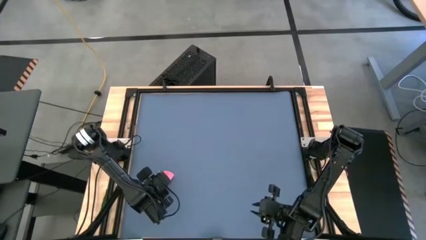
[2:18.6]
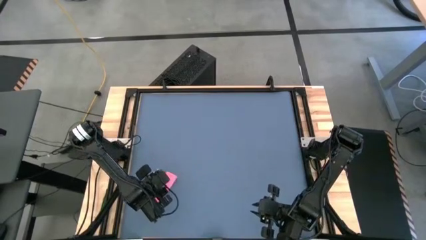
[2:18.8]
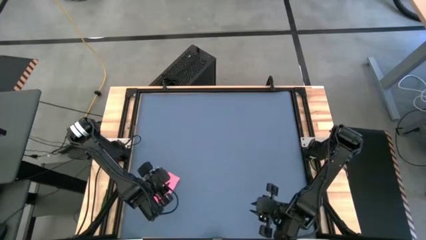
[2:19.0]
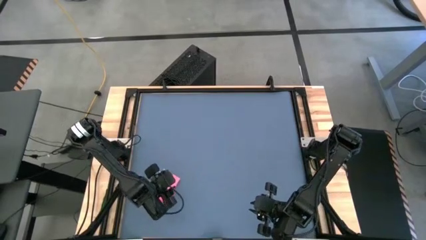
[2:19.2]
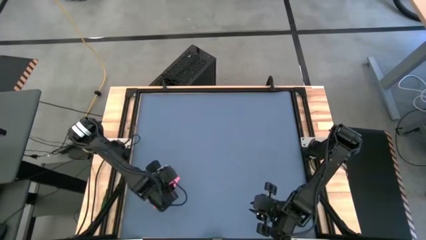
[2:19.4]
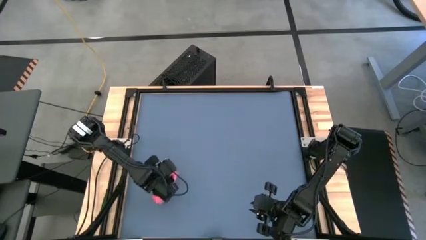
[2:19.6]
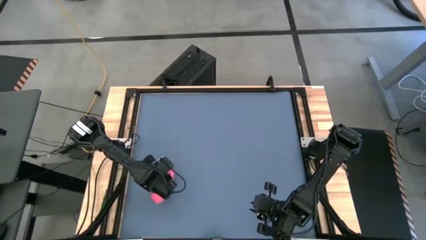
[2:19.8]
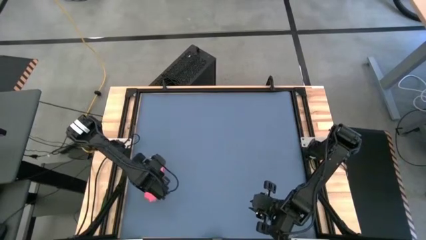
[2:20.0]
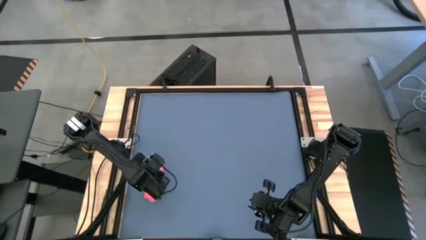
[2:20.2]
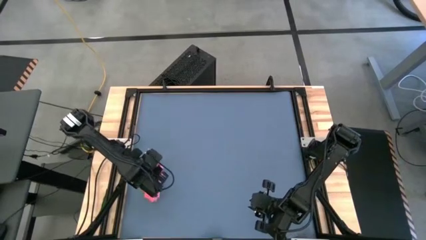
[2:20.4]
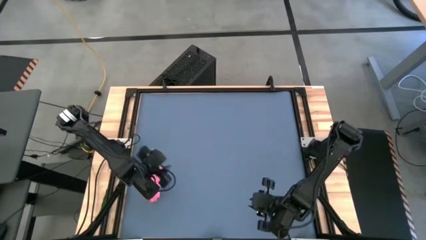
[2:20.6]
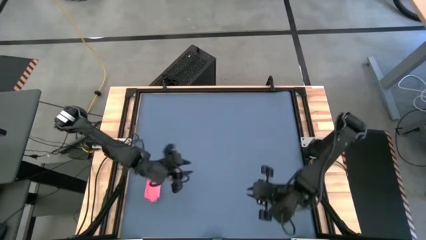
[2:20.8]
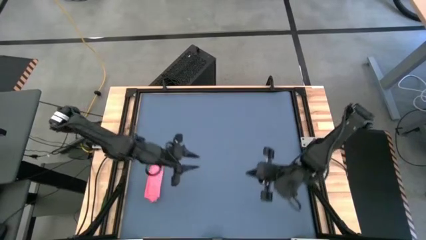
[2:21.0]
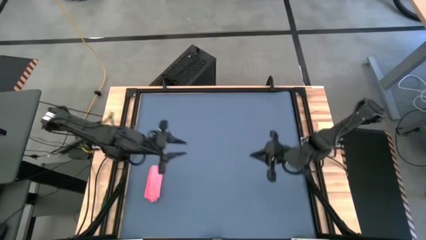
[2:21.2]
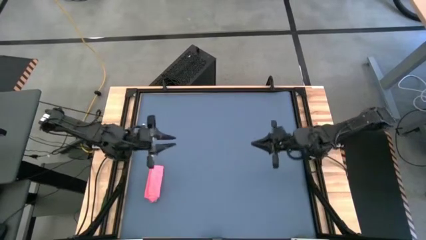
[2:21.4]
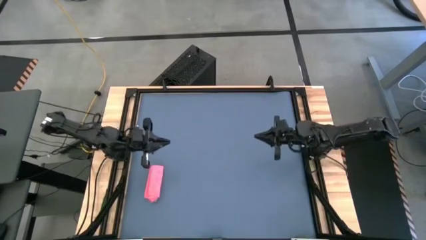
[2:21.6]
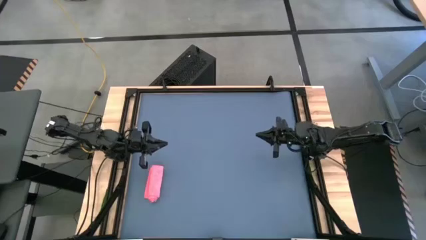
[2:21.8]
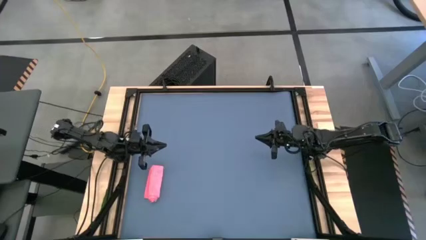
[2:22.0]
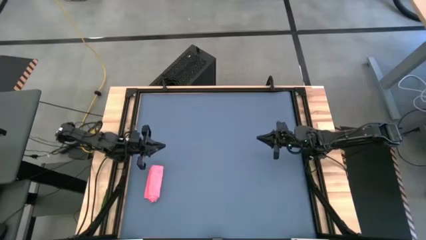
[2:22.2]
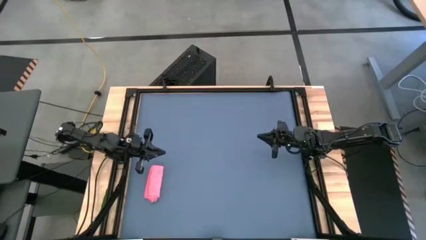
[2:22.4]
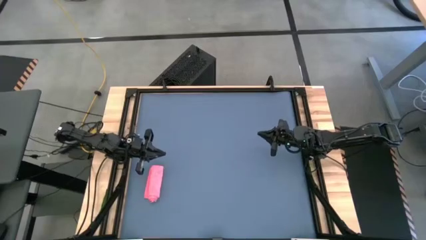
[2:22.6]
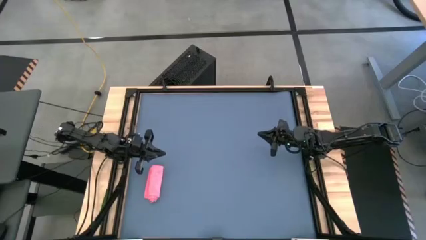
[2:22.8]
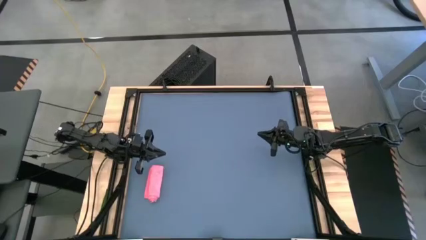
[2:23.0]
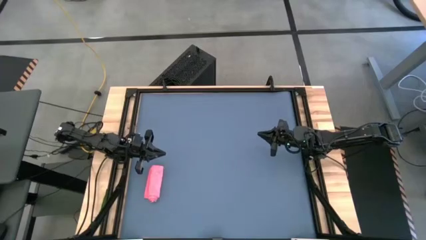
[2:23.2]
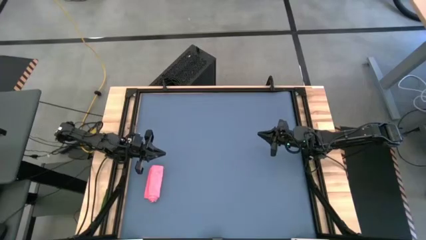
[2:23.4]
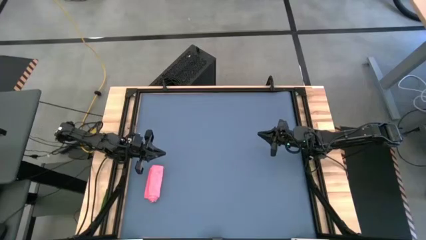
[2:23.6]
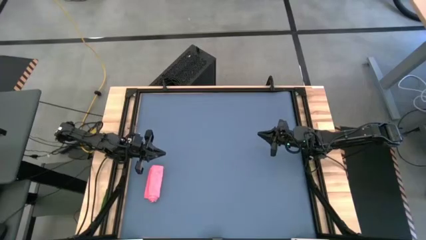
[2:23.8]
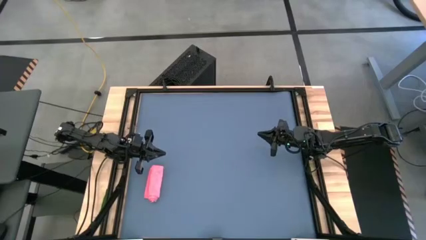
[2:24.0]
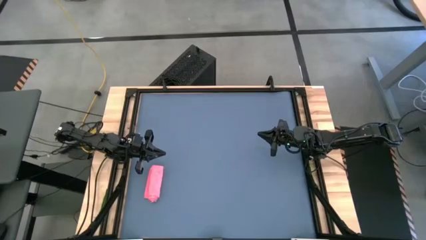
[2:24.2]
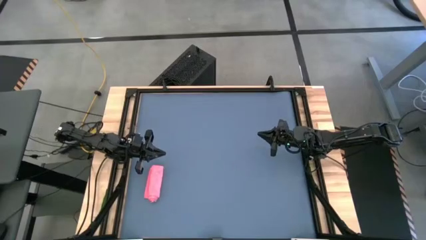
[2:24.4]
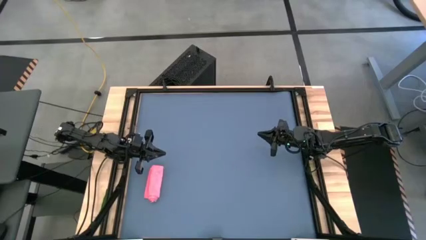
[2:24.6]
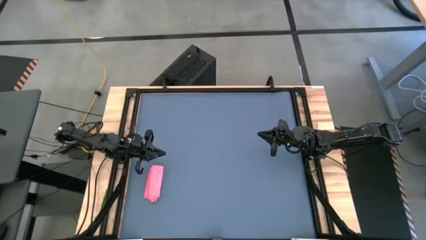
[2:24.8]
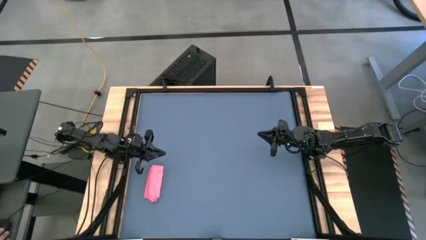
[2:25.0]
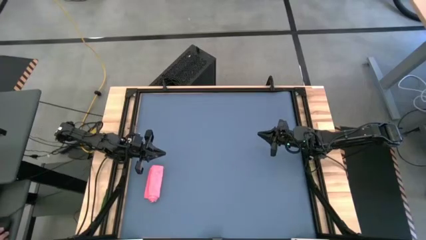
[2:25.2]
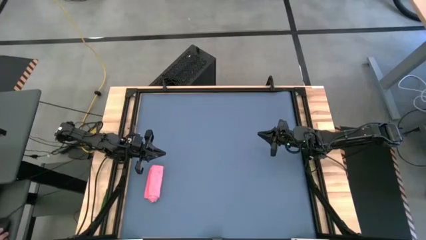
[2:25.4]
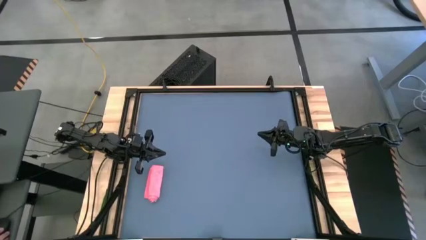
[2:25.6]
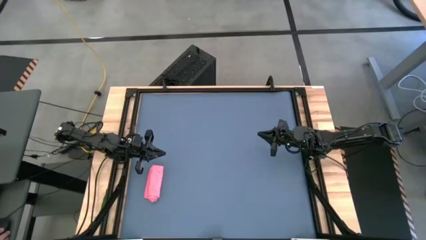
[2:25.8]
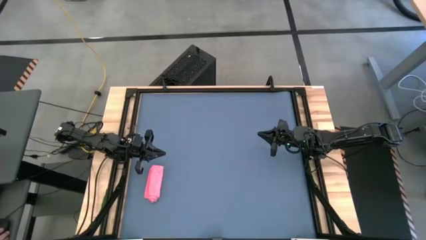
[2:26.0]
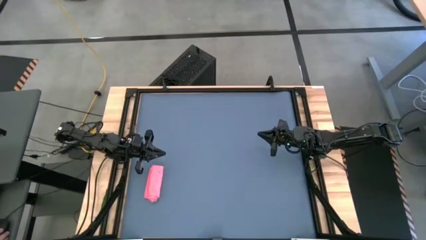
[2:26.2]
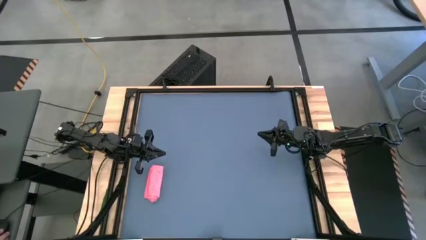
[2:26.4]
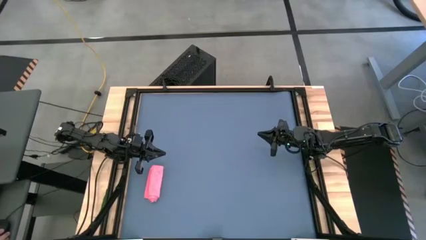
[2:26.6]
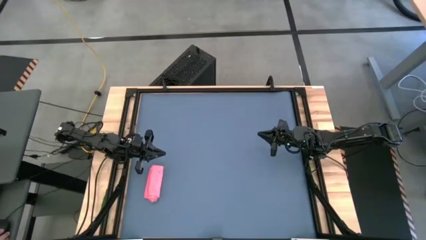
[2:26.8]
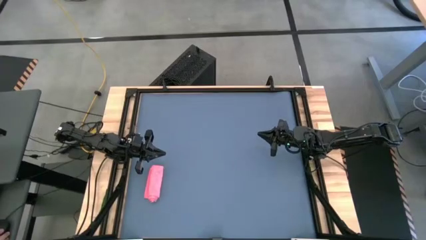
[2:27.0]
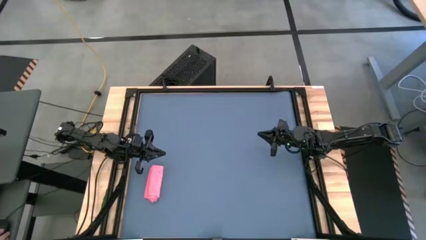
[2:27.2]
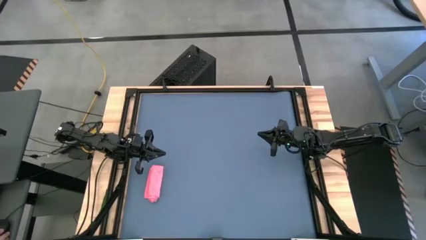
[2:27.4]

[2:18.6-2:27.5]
Task: Roll towel
Return to Home Position

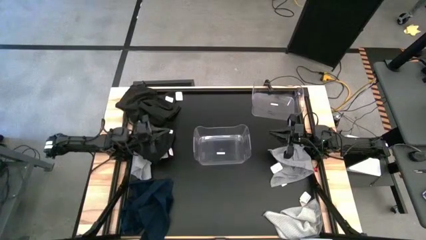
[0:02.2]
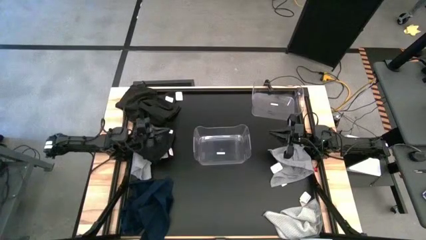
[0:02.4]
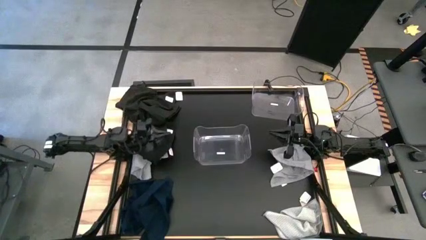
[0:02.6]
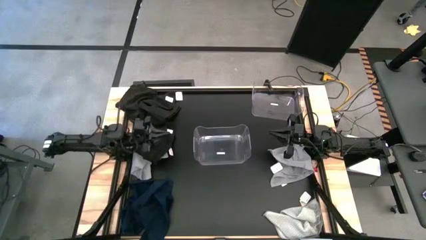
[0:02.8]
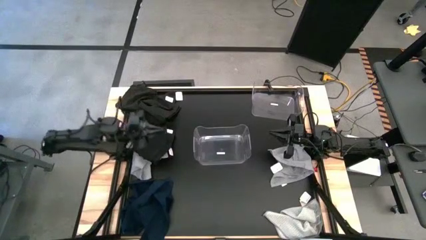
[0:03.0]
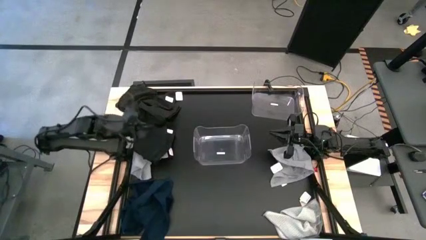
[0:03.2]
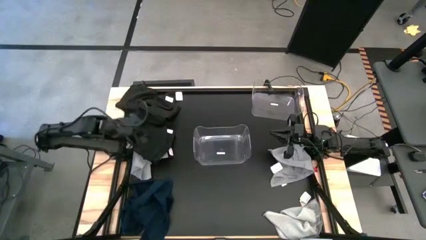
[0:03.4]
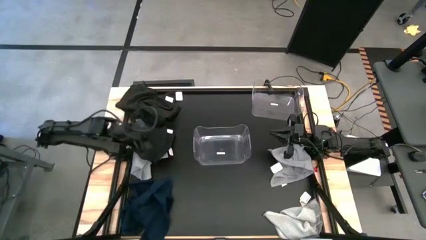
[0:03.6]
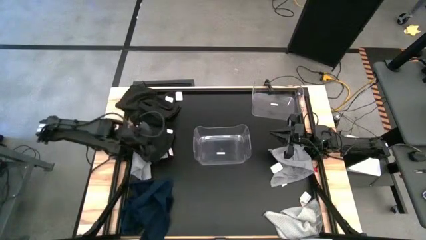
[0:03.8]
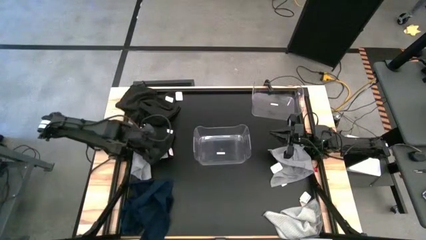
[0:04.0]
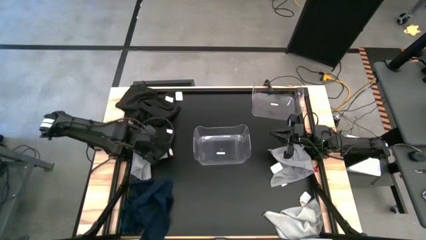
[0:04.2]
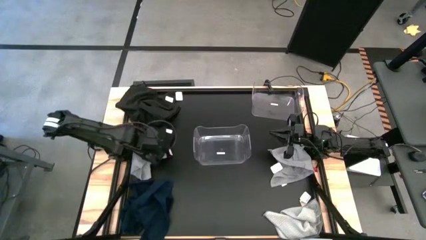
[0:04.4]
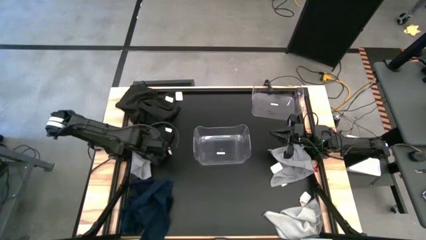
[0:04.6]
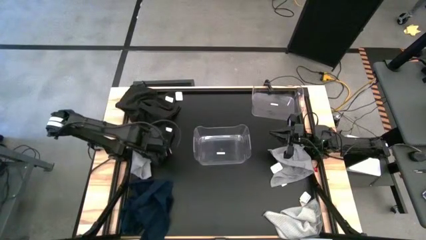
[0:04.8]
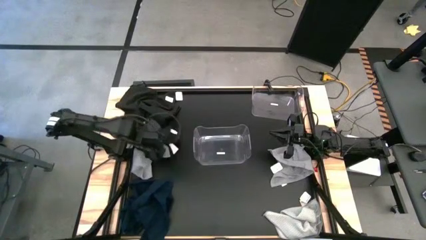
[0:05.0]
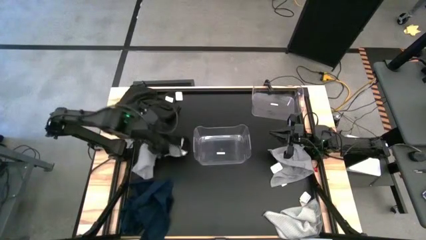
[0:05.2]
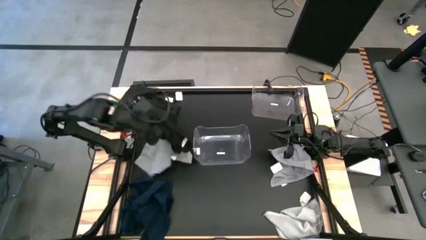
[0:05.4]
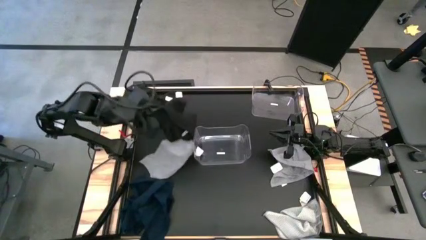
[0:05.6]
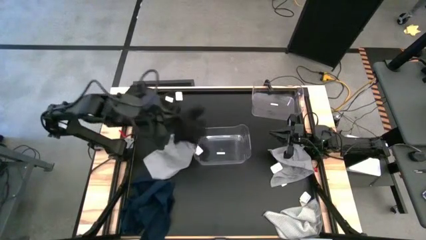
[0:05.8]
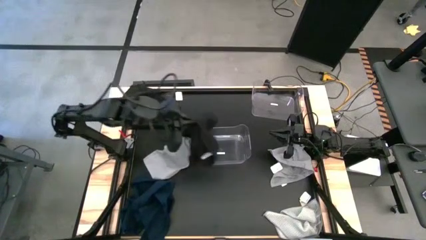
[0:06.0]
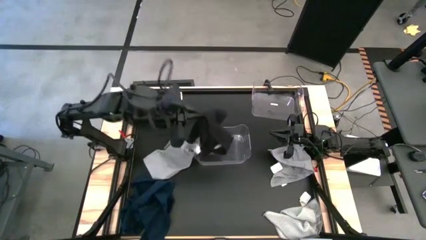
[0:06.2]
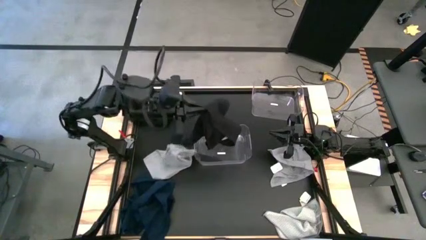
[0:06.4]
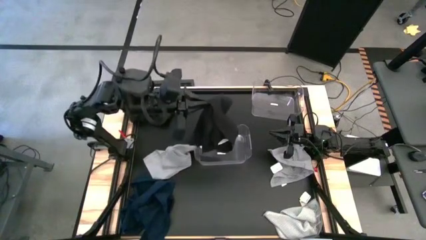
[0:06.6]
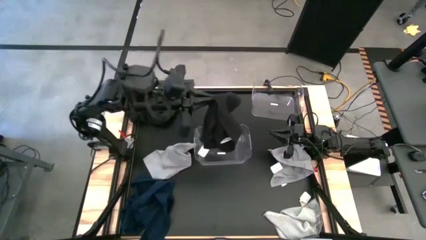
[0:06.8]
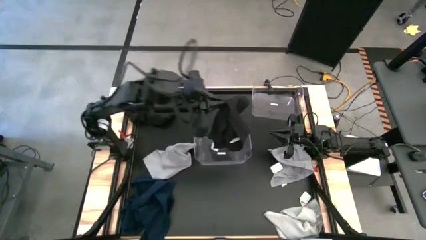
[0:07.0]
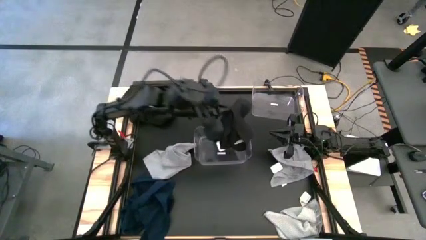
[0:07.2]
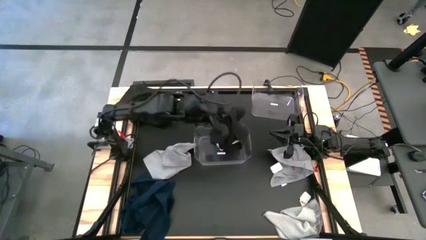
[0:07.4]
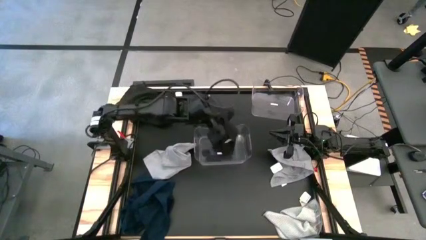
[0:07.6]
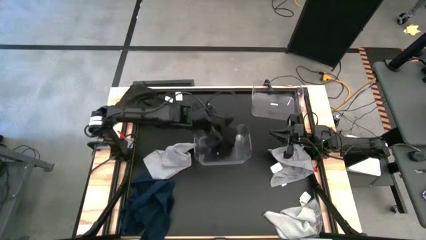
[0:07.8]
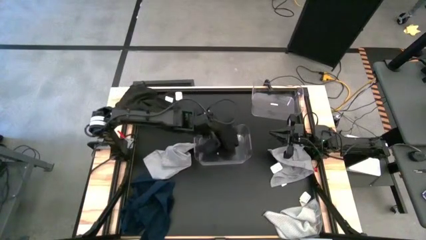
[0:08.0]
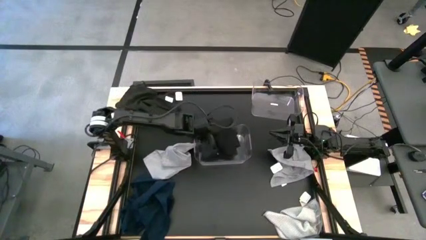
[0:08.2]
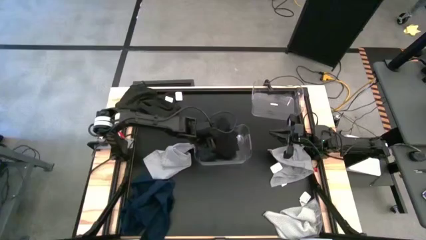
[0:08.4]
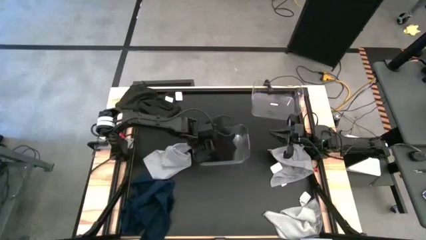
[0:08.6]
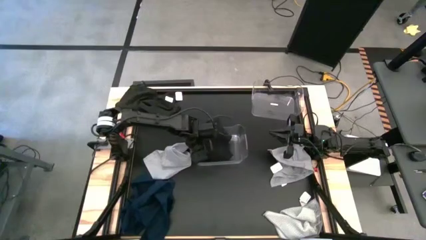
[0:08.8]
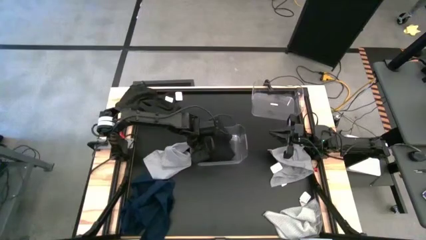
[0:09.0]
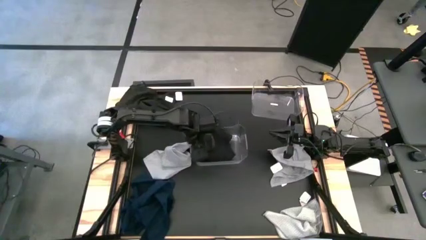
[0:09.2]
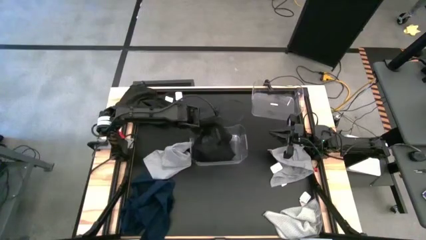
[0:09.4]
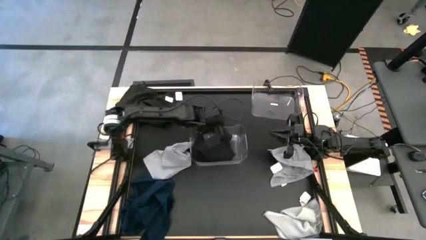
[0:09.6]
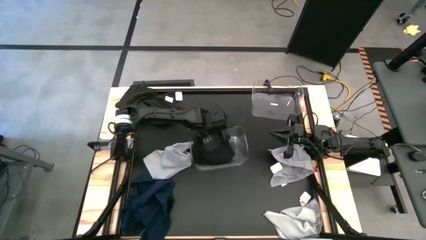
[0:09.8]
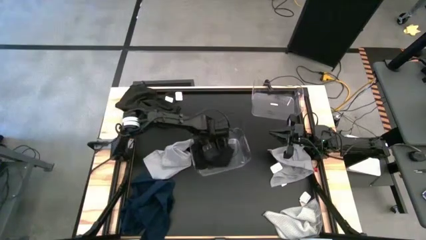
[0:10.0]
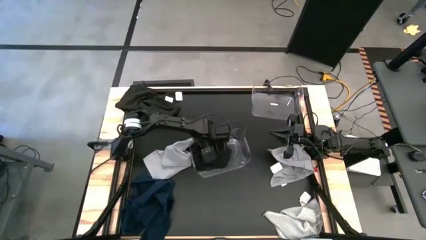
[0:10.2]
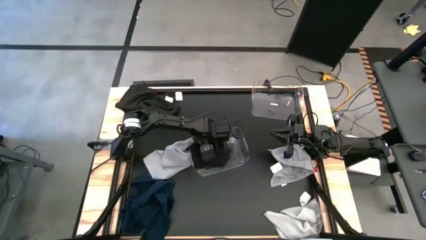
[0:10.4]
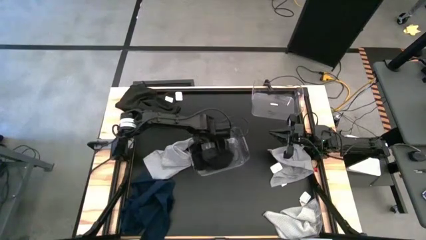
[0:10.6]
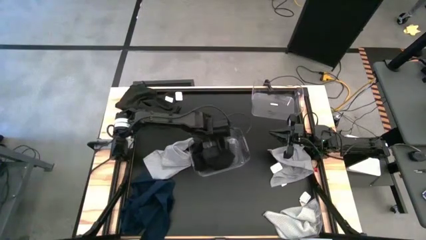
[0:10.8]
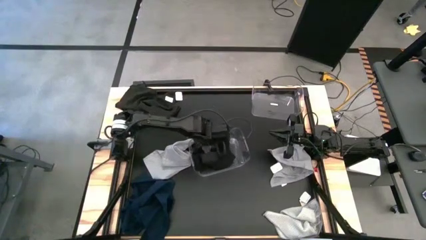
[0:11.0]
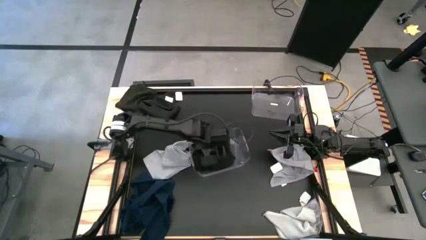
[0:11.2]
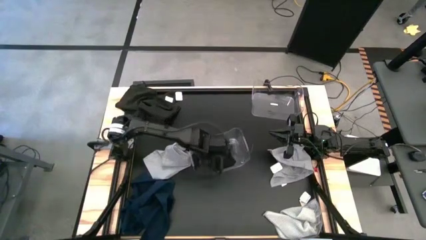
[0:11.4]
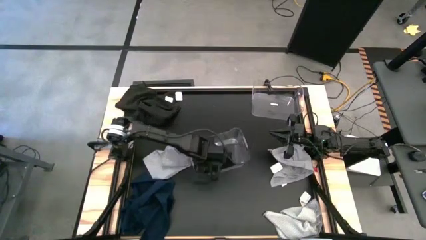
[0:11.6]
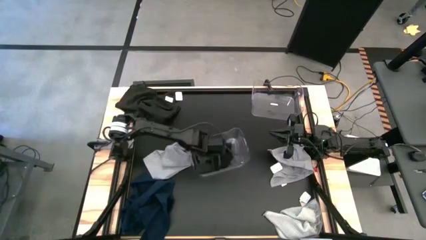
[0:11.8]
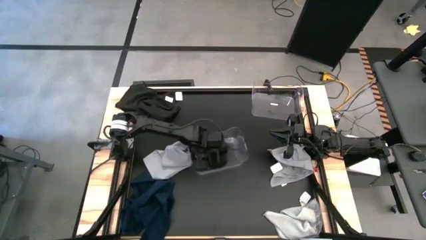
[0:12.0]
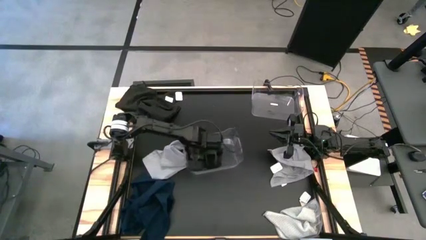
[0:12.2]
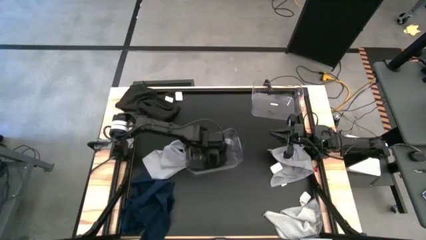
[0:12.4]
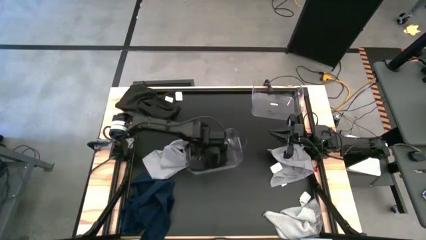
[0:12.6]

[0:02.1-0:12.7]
Task: Sort towels by color in basket
Put the bottom black towel into the bottom transparent bin
